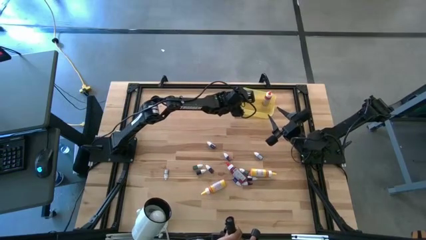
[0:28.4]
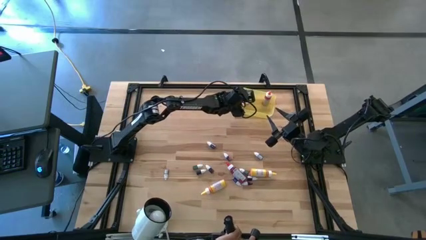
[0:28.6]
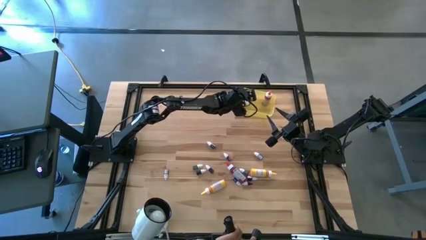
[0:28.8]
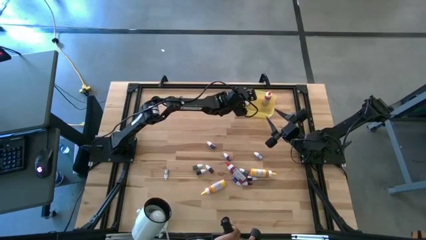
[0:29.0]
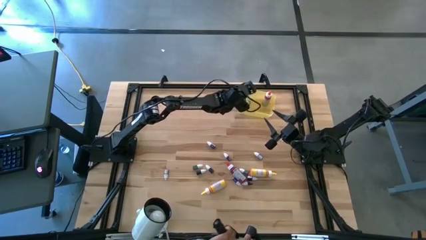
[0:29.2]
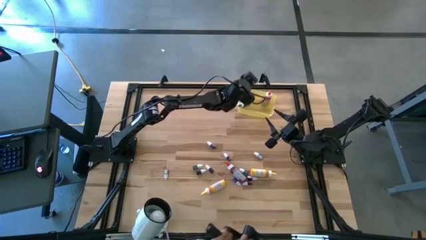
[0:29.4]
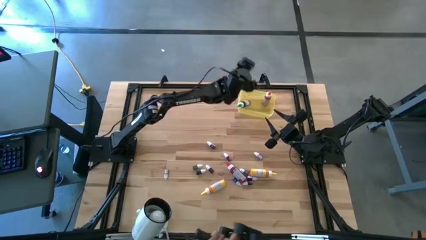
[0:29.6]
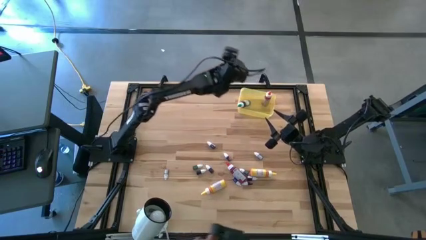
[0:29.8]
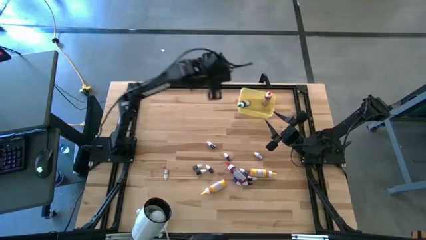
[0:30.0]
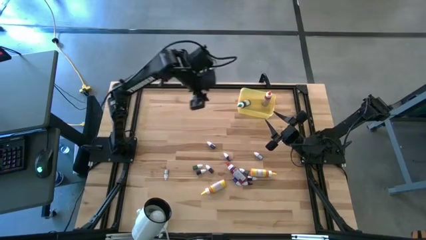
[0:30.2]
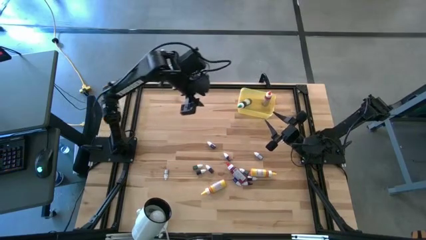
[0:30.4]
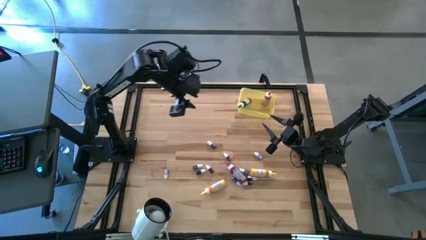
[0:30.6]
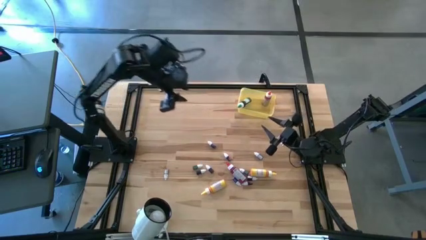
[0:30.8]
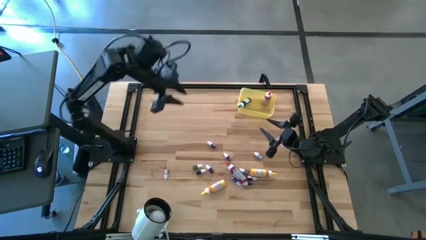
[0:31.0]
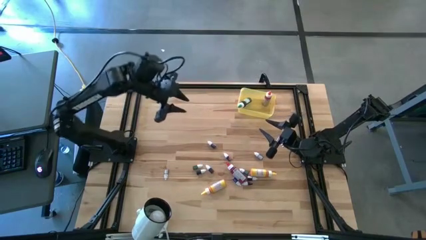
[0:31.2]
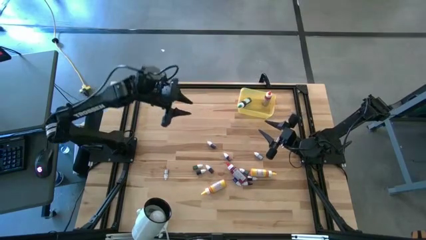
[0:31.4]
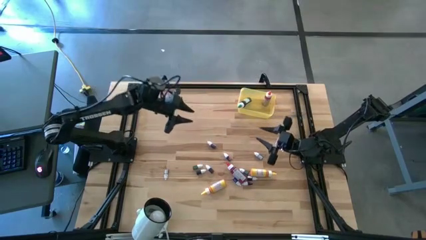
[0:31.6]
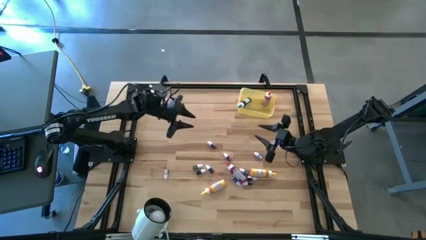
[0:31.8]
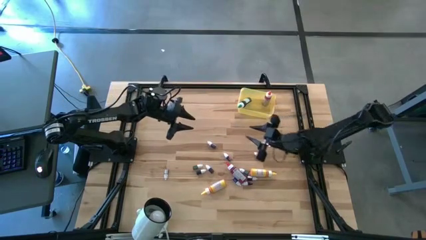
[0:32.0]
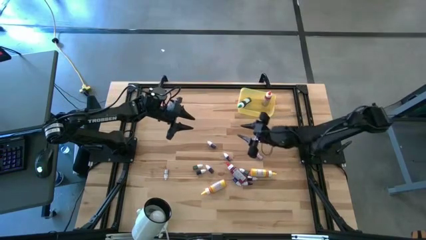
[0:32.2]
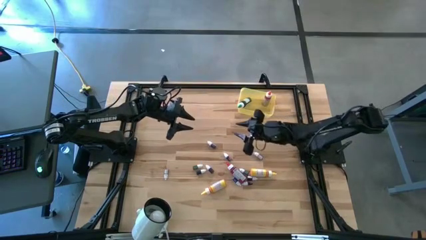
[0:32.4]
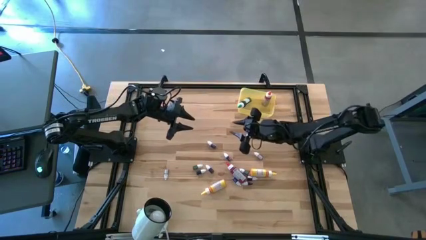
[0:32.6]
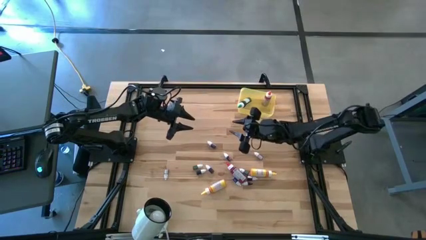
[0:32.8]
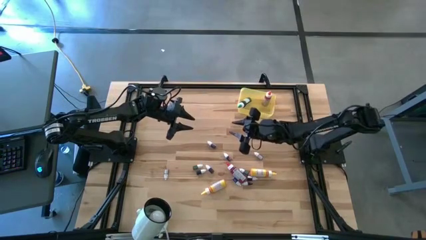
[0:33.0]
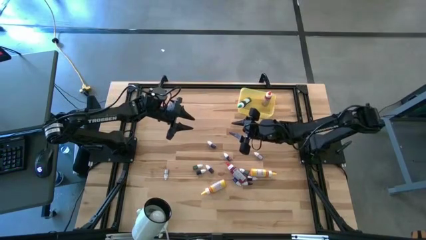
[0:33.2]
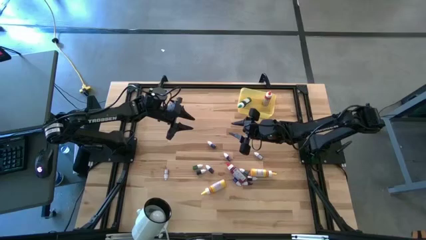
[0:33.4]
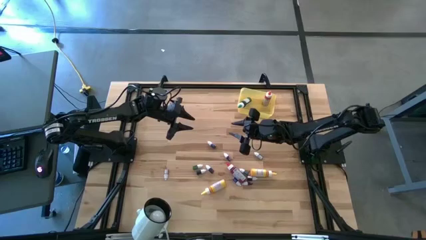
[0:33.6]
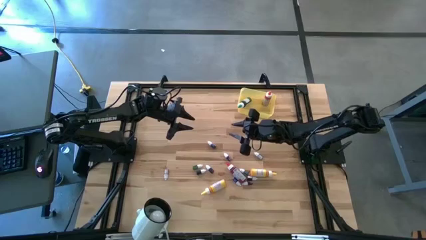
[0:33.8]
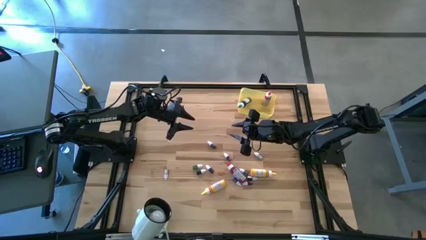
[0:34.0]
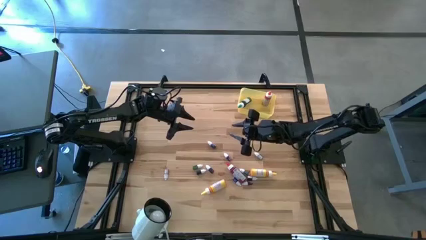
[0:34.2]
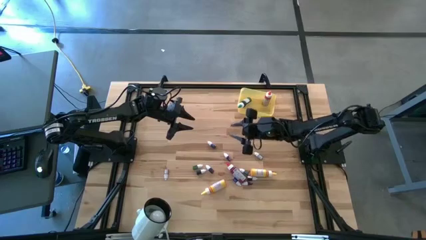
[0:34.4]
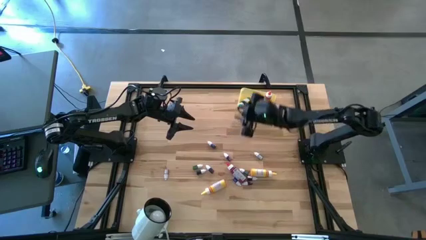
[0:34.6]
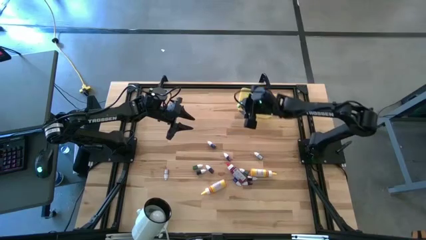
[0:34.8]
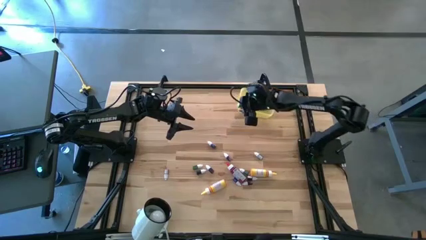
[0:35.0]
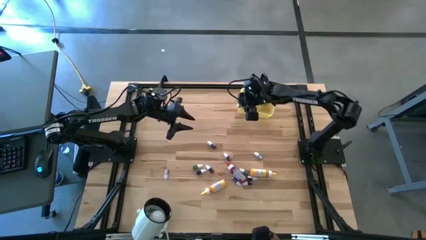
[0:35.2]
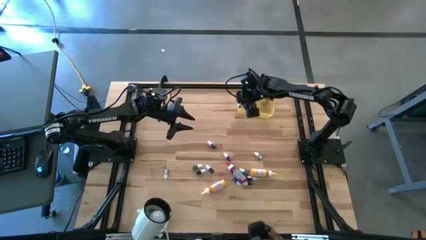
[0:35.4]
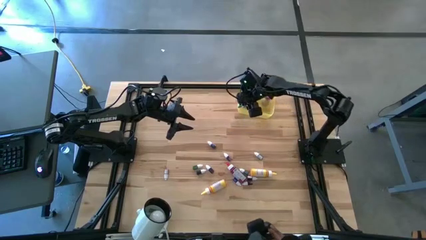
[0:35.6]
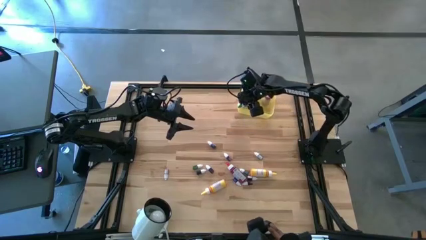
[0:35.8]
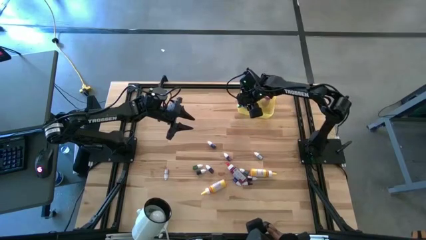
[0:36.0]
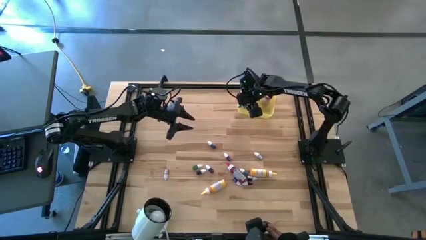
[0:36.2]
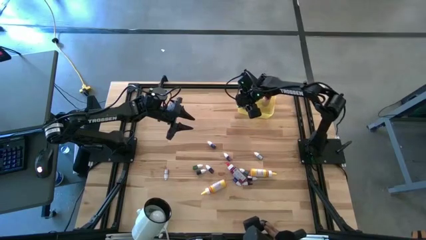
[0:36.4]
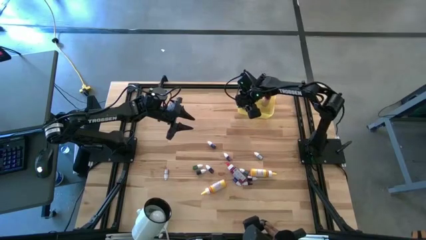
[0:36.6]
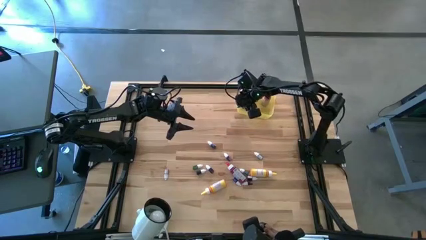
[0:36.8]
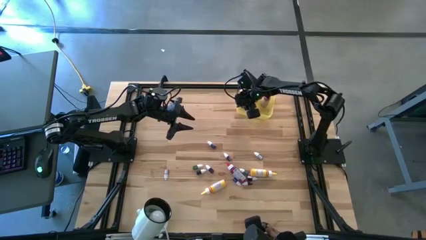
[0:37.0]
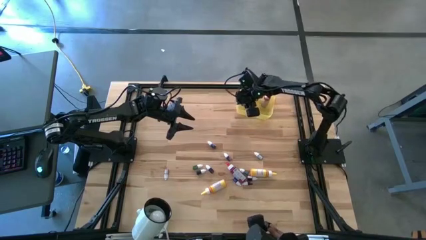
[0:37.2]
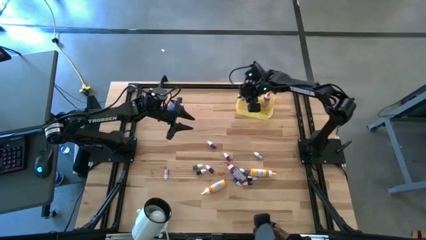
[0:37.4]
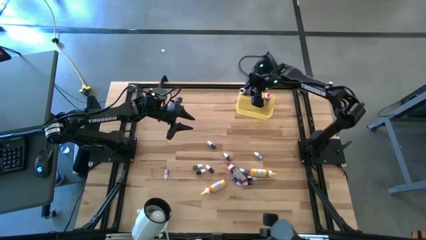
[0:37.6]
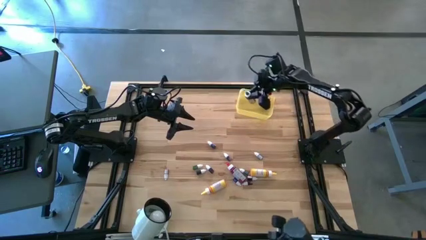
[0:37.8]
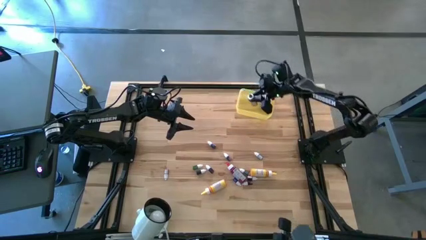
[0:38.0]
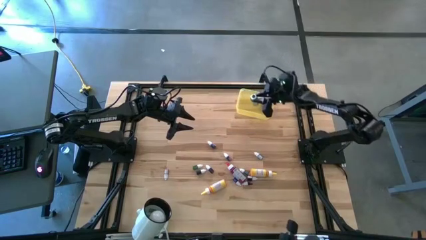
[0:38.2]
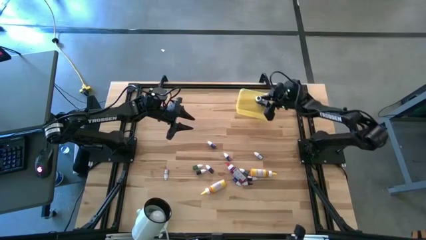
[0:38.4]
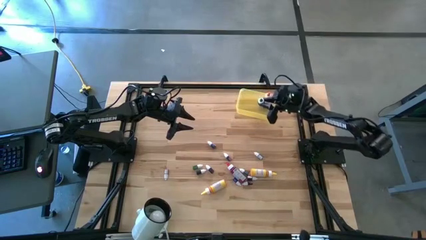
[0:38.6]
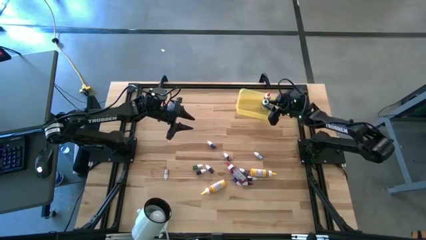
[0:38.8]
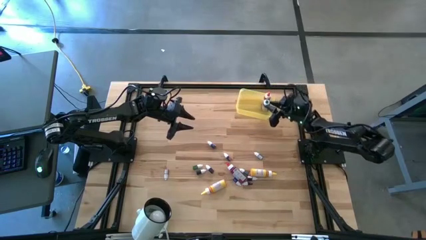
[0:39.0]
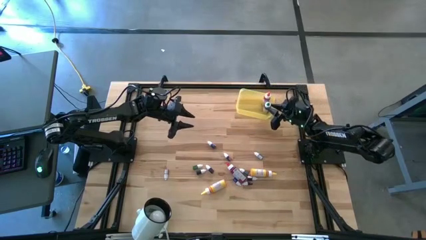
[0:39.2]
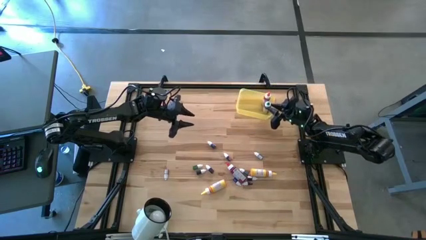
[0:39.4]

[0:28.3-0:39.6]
Task: Pick & Place food coloring
Adjust the big green food coloring bottle

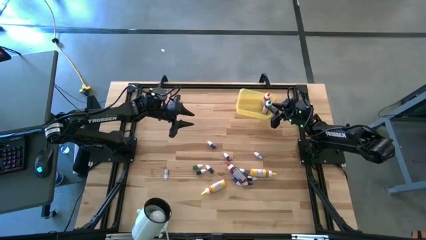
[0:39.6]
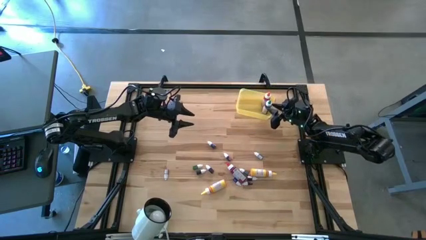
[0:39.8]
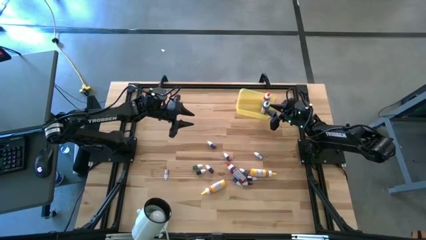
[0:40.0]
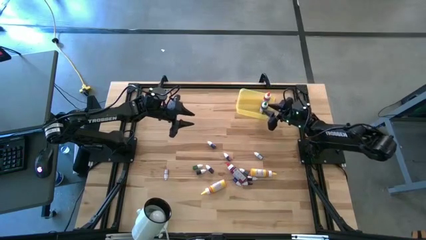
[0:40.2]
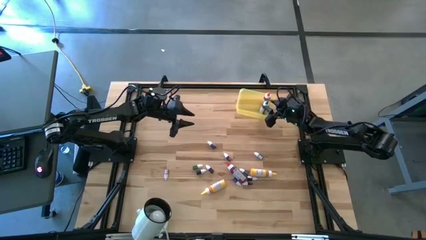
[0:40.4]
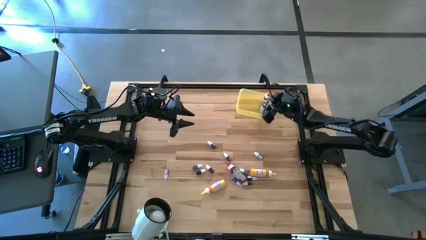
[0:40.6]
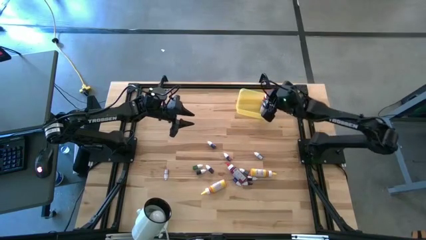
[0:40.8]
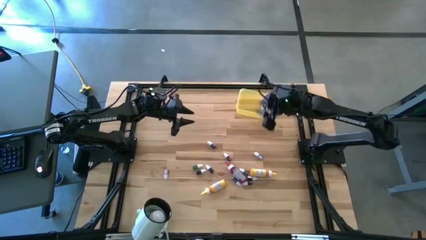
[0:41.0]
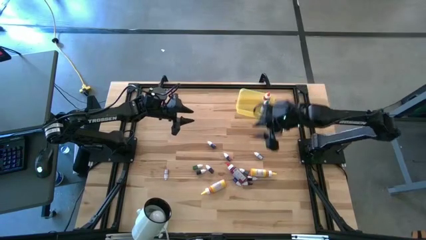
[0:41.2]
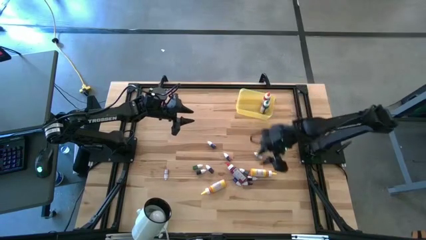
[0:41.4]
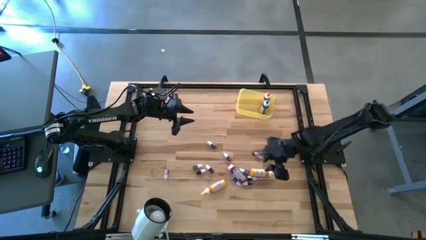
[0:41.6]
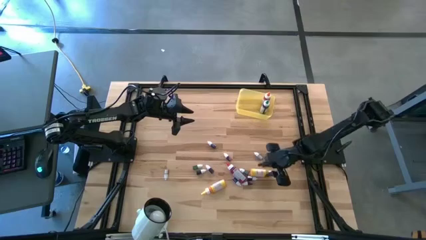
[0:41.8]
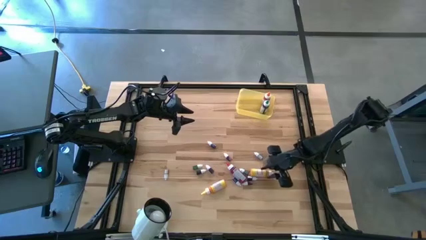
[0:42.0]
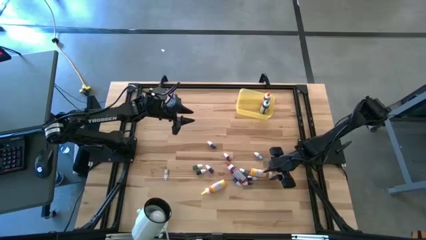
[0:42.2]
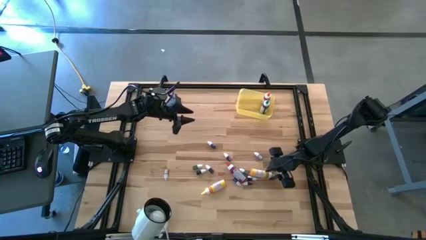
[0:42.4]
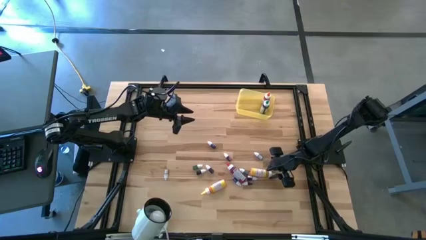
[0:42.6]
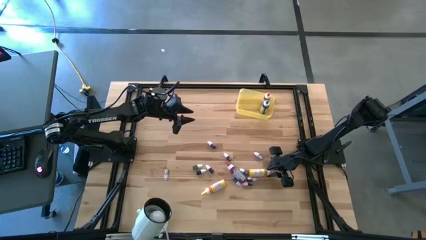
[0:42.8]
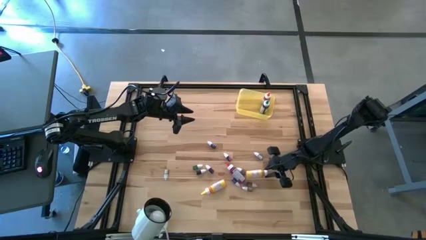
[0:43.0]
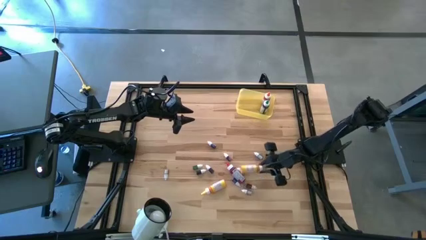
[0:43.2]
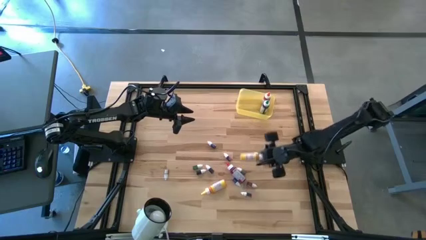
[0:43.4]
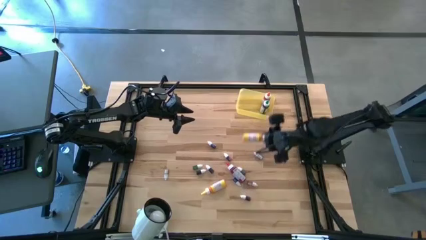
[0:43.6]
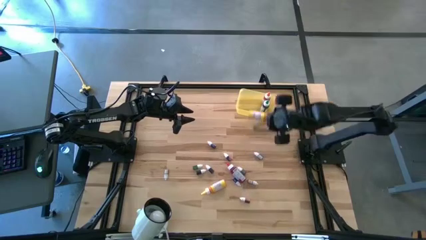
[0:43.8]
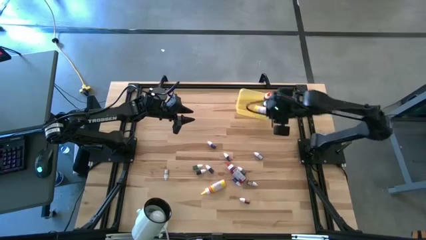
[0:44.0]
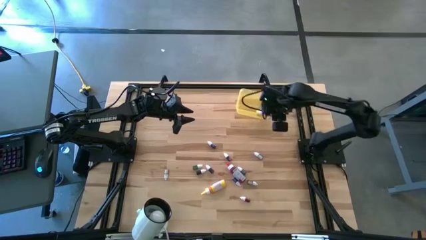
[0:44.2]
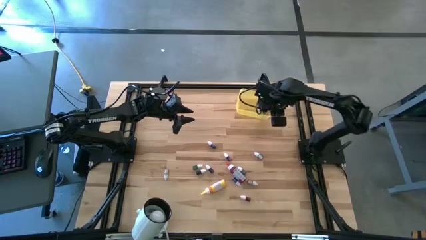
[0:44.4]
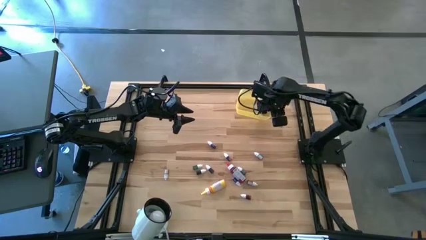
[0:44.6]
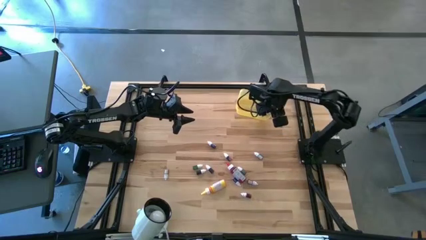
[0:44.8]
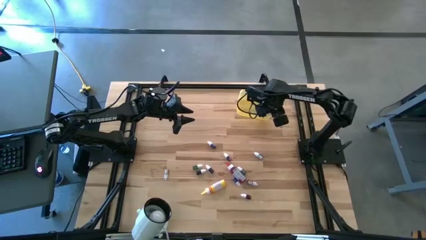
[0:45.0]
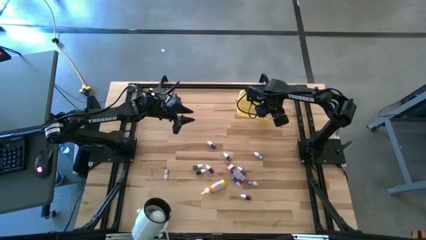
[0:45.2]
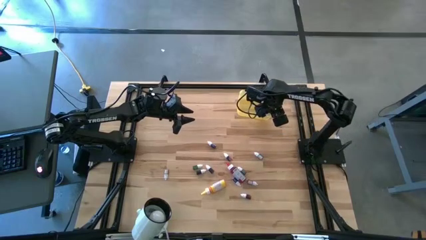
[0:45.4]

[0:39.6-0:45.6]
Put the right big yellow food coloring bottle into the yellow bin
